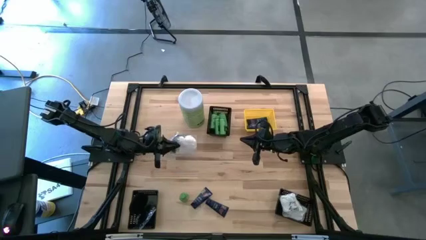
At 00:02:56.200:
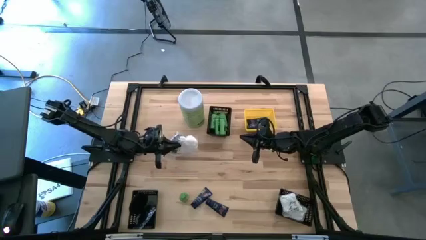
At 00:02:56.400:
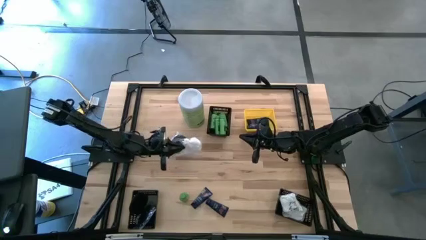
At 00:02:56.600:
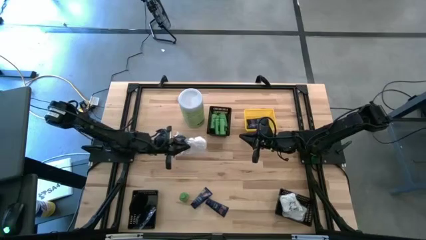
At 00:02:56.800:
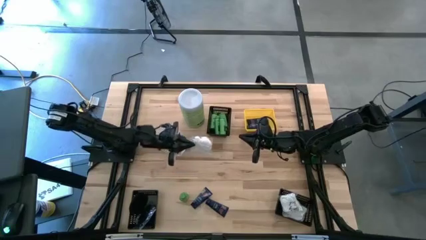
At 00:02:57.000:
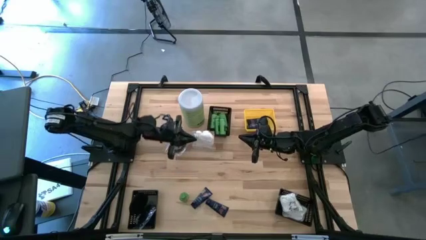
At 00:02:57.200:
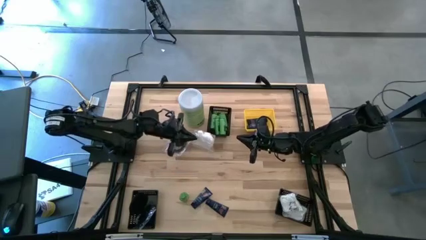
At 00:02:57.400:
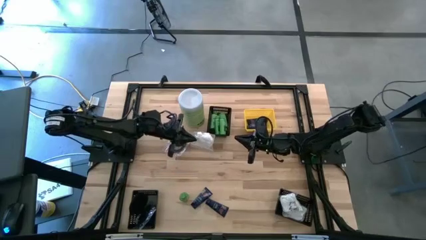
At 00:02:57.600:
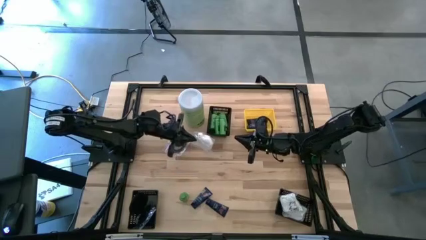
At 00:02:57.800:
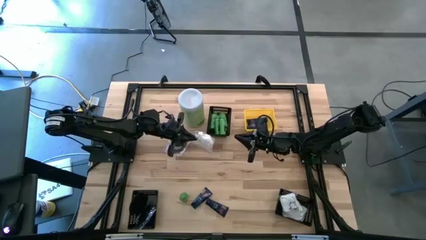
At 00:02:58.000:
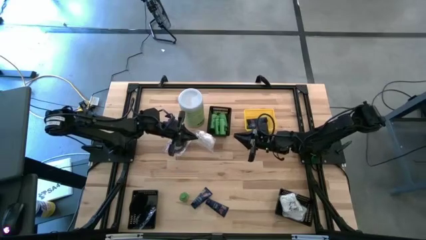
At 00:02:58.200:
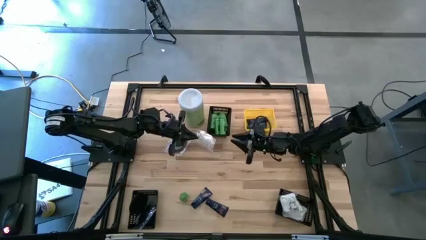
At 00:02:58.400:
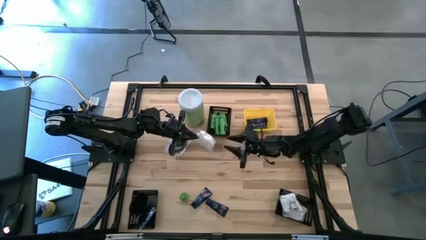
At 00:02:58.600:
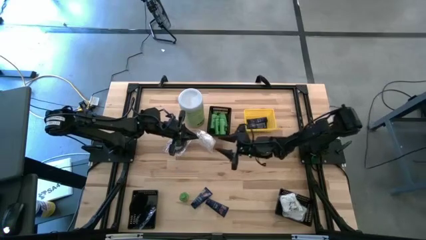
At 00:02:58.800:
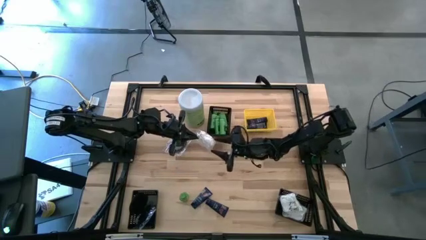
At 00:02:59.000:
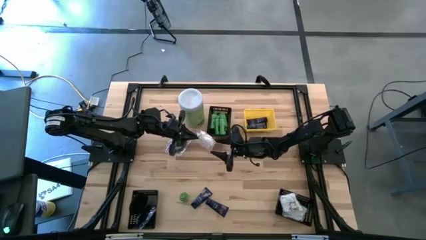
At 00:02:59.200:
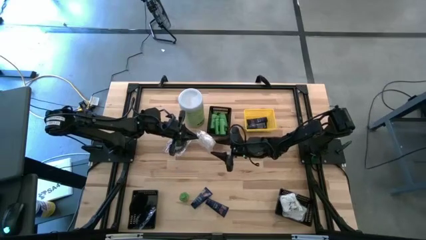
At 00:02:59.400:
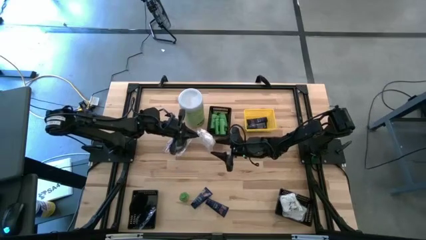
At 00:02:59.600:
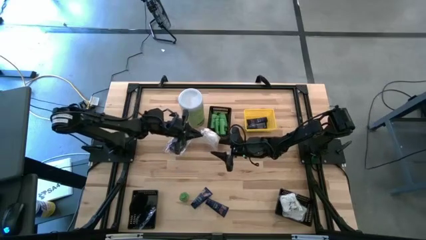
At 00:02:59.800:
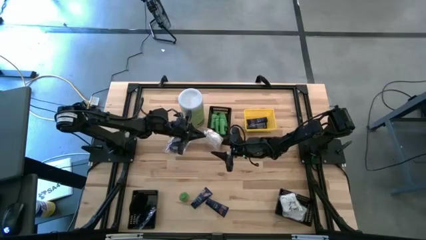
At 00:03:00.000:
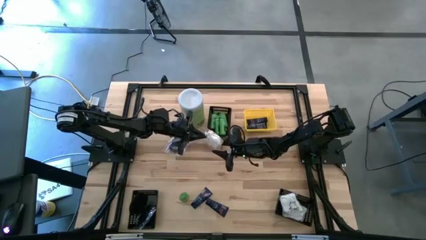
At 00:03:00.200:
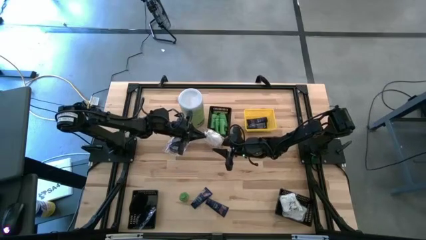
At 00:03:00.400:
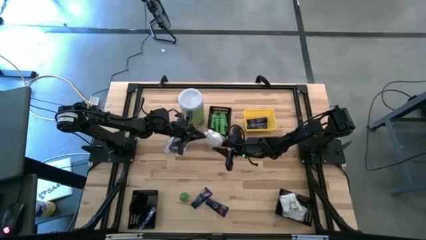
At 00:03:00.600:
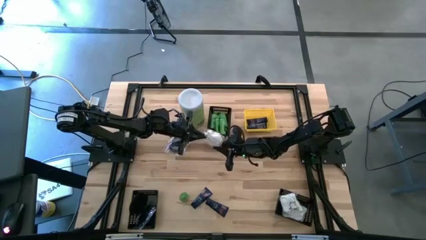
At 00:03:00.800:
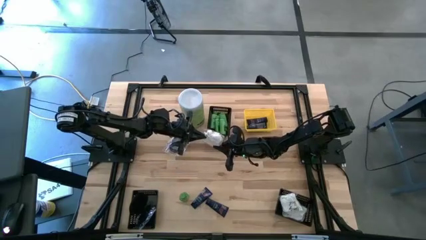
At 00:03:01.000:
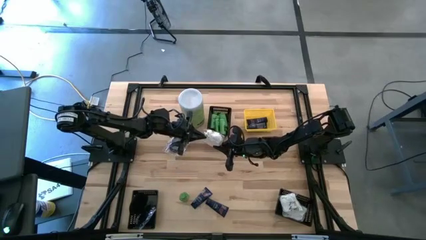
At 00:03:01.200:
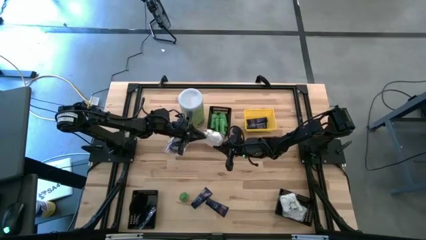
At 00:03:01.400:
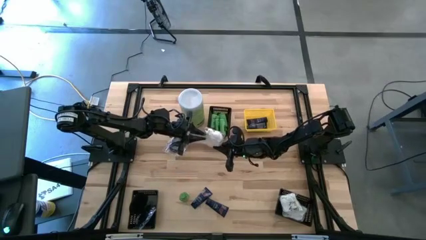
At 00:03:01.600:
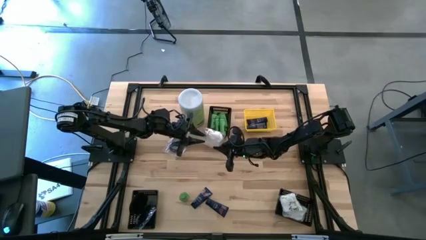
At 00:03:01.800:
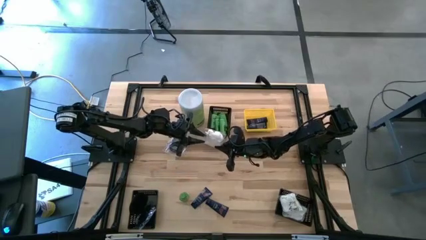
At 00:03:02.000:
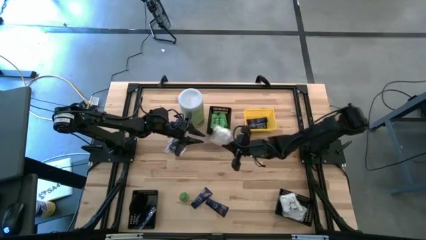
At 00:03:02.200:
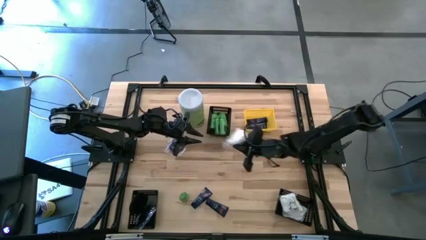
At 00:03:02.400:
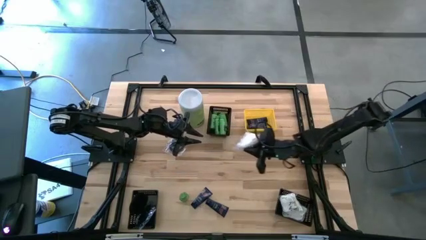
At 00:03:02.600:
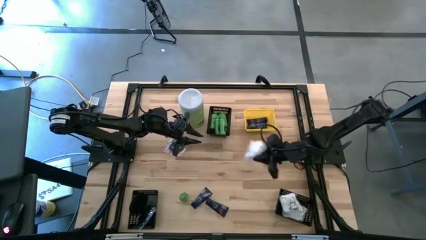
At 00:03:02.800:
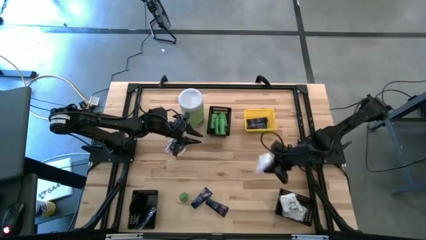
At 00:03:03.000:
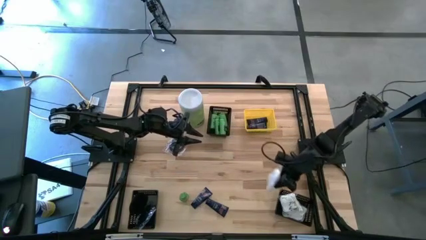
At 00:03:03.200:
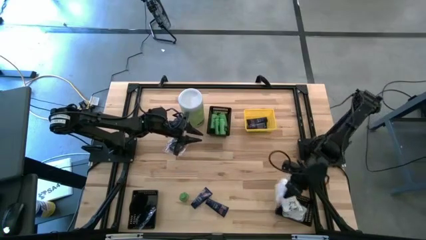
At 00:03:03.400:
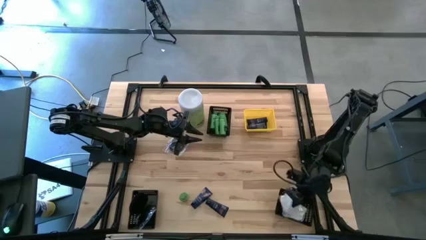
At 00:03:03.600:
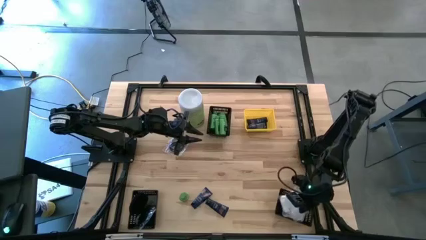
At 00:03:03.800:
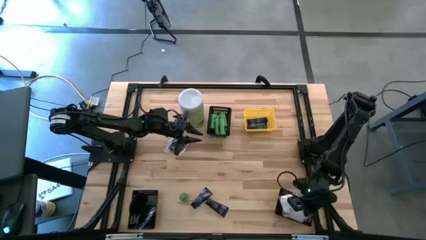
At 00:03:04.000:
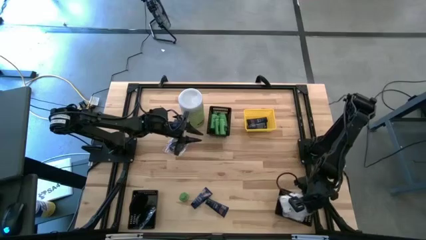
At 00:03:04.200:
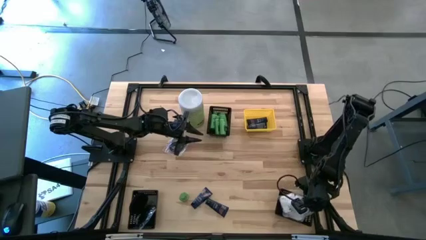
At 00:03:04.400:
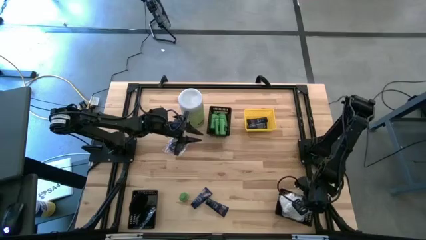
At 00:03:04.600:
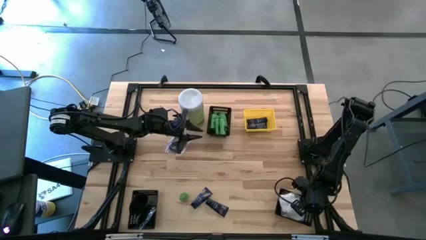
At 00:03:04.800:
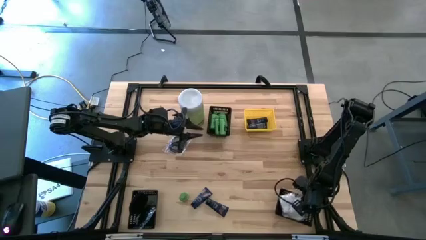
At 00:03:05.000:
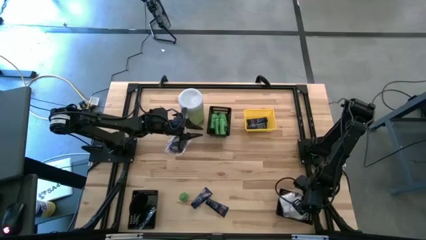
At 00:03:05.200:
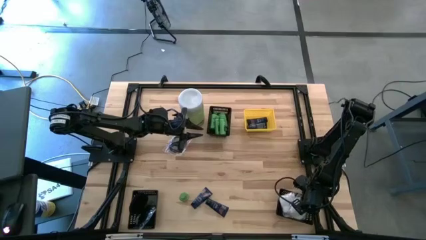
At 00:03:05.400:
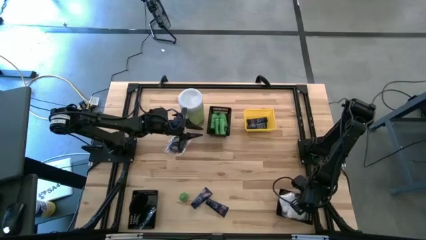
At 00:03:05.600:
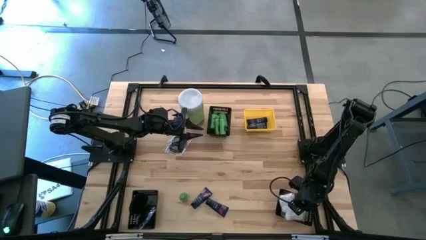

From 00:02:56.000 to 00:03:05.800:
Task: Pick & Place Travel size toiletries
Put the white cotton pack into the bottom right black bin
